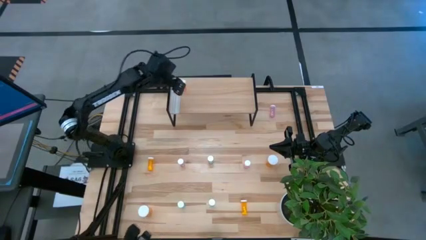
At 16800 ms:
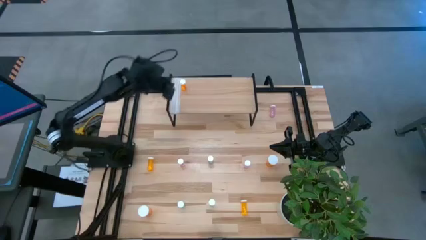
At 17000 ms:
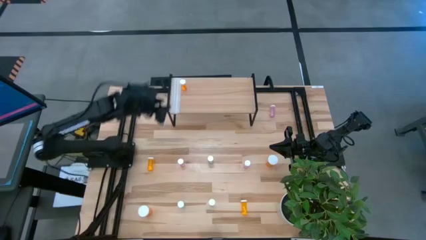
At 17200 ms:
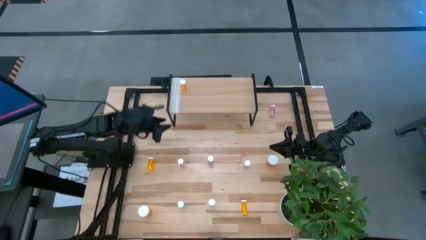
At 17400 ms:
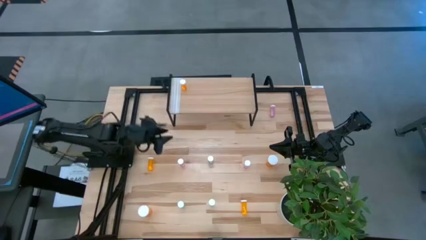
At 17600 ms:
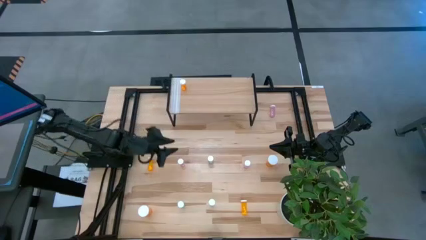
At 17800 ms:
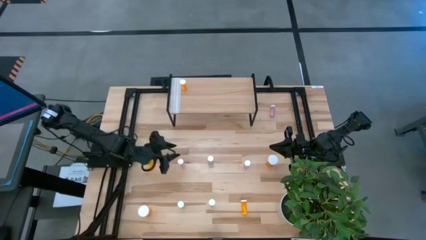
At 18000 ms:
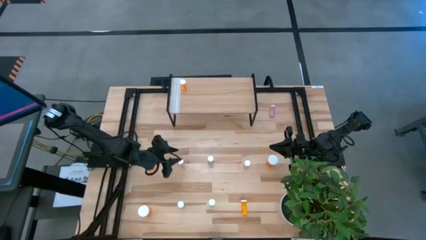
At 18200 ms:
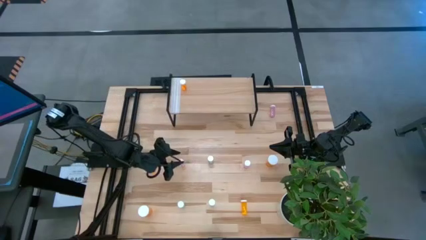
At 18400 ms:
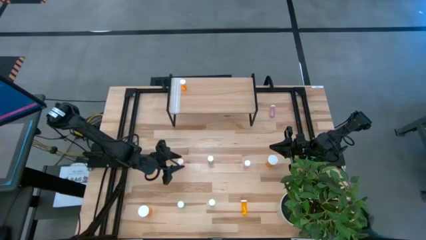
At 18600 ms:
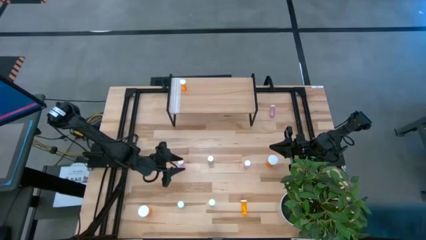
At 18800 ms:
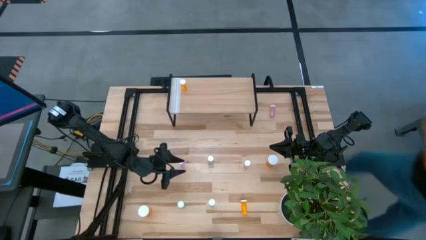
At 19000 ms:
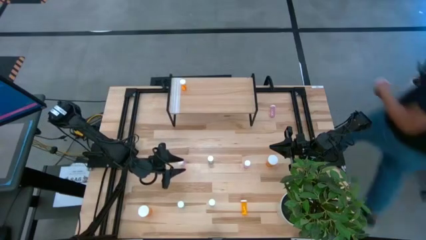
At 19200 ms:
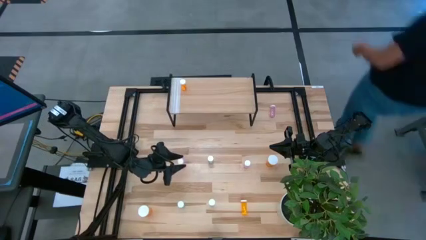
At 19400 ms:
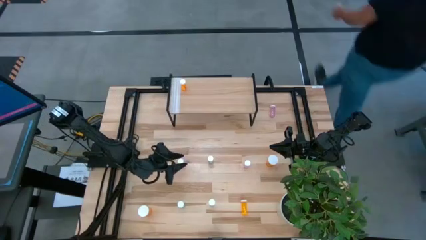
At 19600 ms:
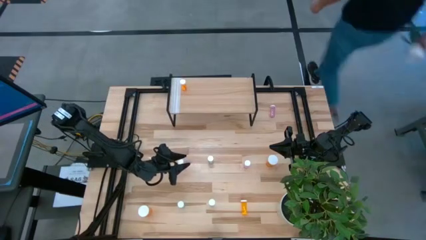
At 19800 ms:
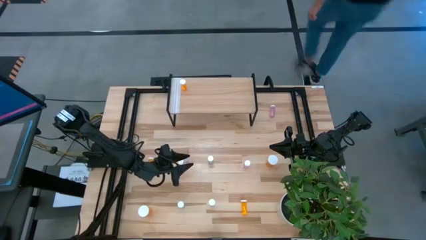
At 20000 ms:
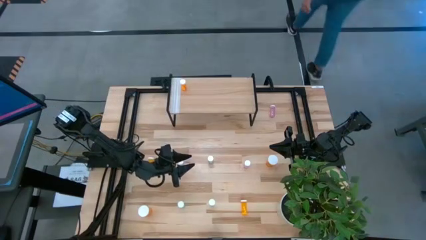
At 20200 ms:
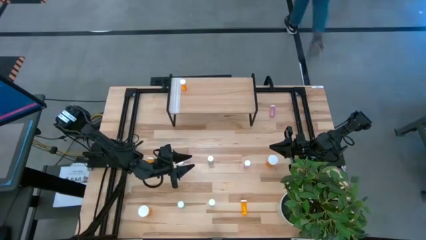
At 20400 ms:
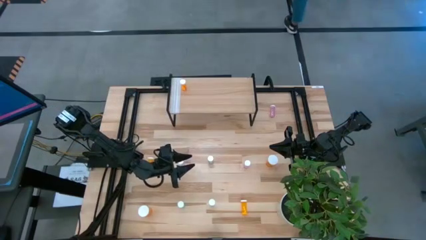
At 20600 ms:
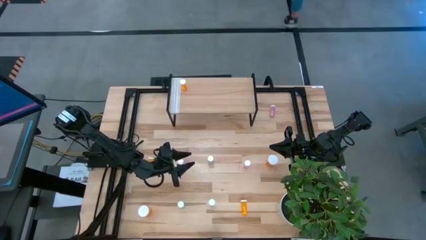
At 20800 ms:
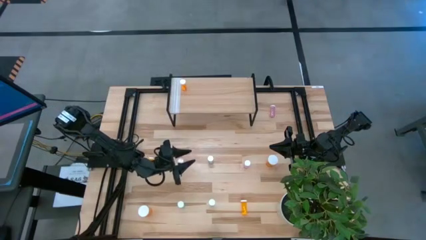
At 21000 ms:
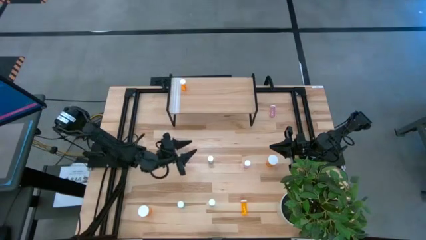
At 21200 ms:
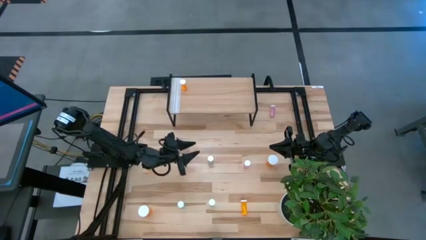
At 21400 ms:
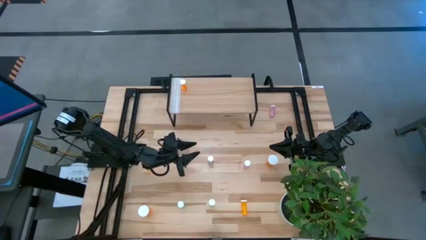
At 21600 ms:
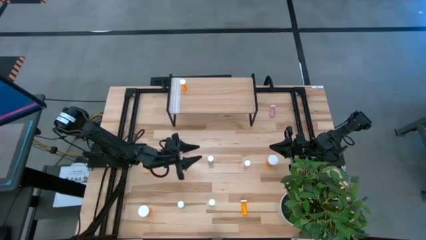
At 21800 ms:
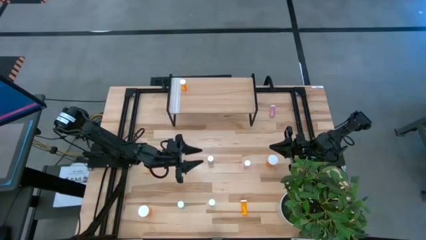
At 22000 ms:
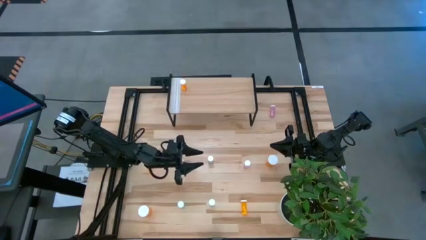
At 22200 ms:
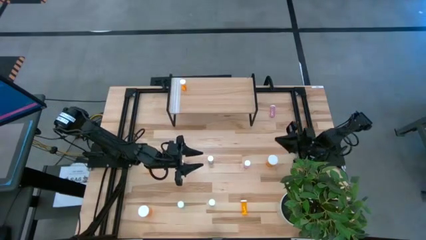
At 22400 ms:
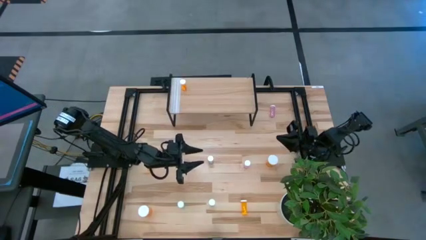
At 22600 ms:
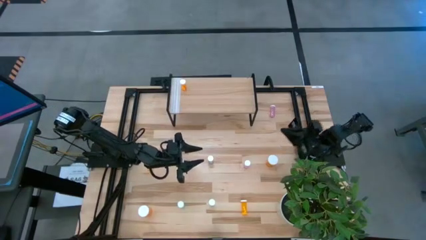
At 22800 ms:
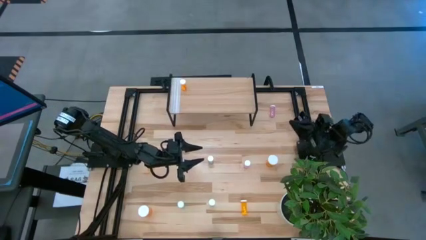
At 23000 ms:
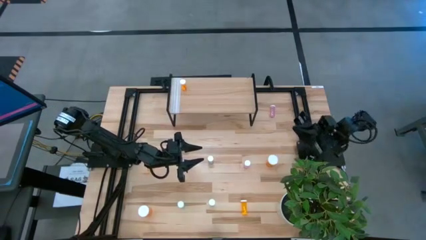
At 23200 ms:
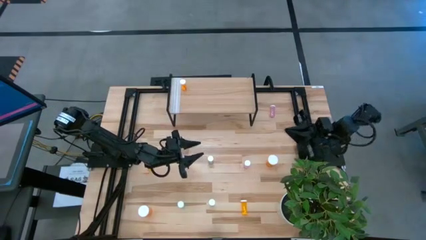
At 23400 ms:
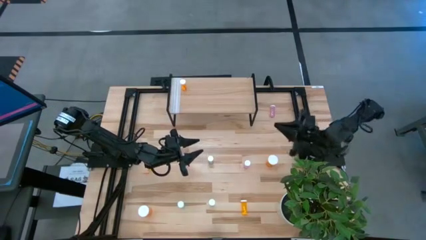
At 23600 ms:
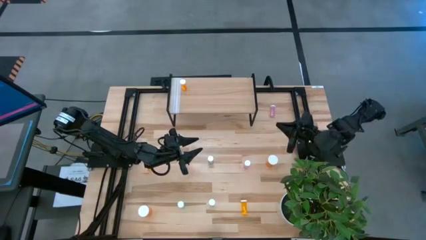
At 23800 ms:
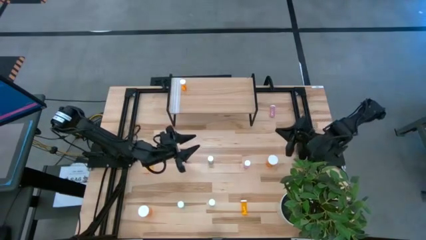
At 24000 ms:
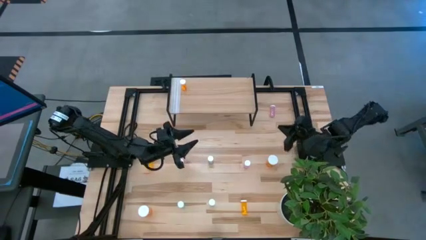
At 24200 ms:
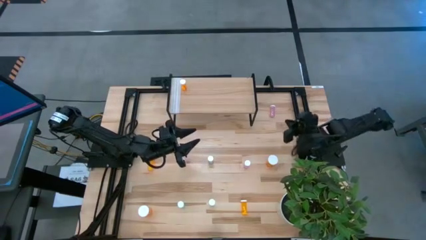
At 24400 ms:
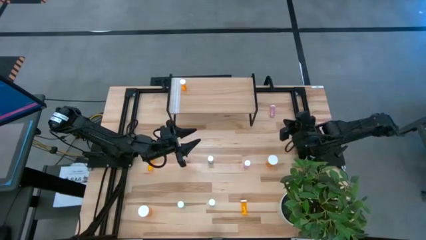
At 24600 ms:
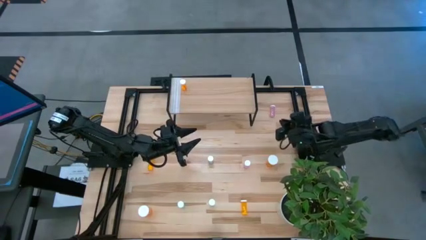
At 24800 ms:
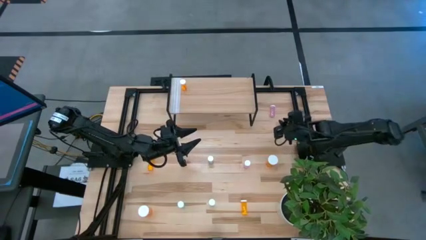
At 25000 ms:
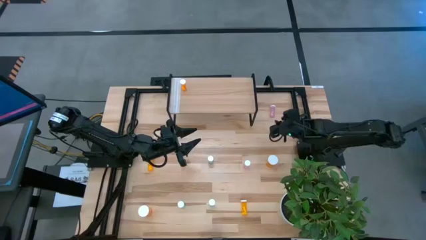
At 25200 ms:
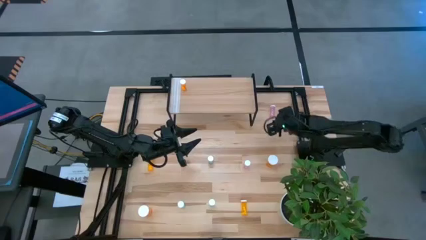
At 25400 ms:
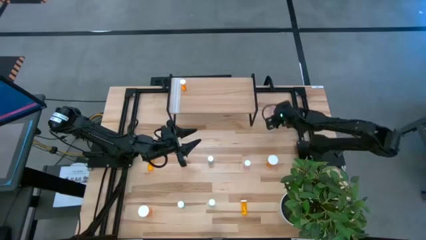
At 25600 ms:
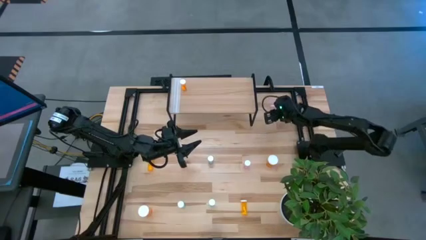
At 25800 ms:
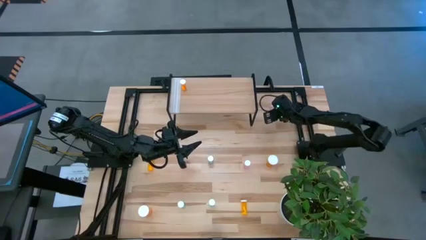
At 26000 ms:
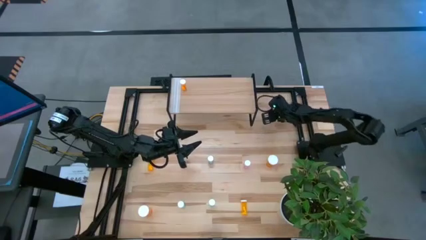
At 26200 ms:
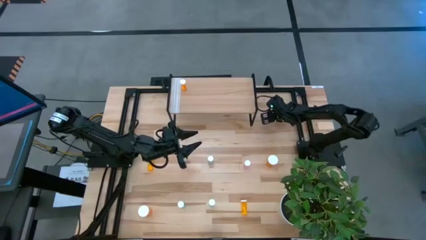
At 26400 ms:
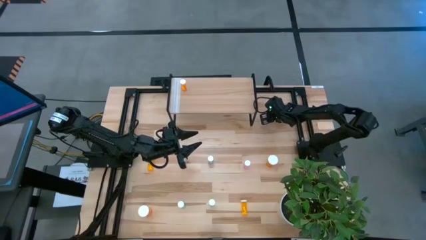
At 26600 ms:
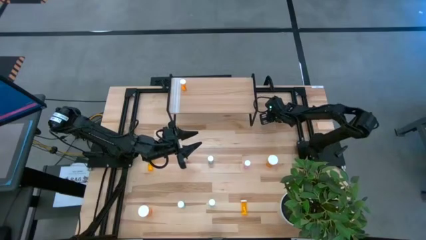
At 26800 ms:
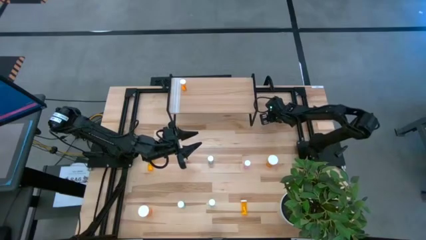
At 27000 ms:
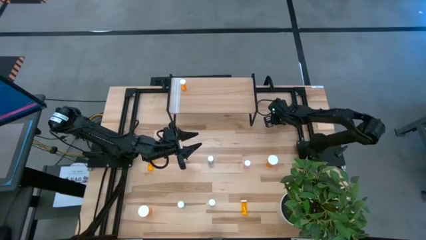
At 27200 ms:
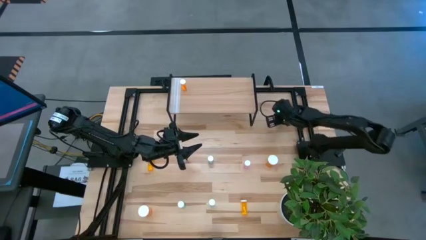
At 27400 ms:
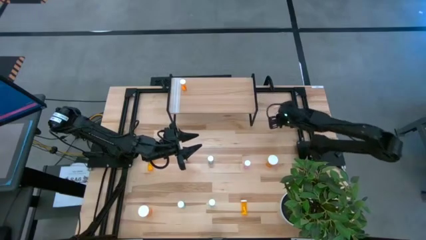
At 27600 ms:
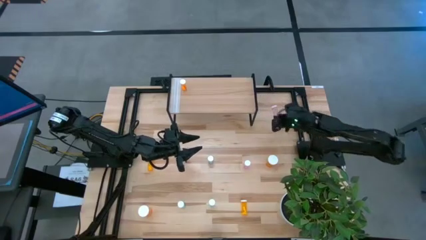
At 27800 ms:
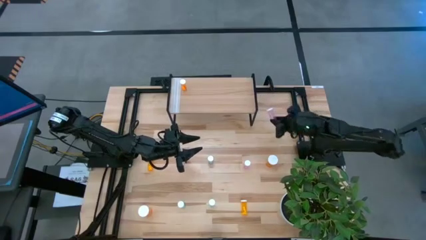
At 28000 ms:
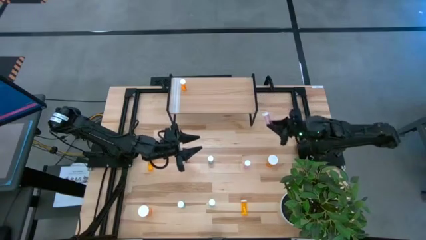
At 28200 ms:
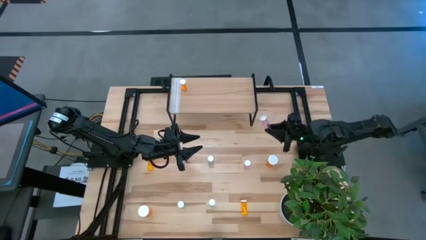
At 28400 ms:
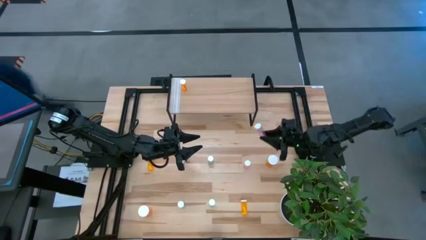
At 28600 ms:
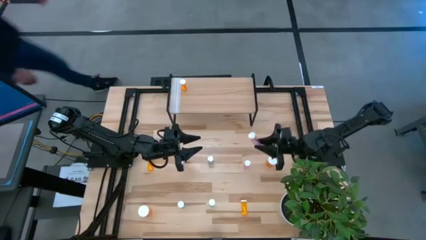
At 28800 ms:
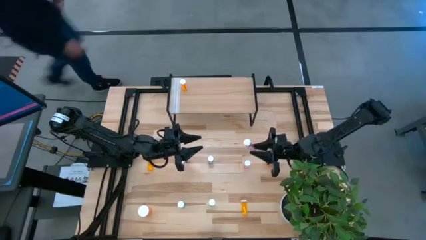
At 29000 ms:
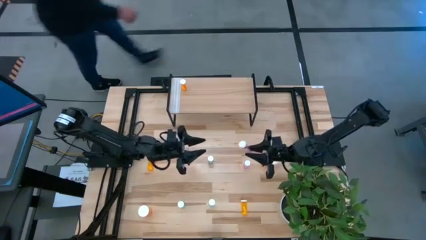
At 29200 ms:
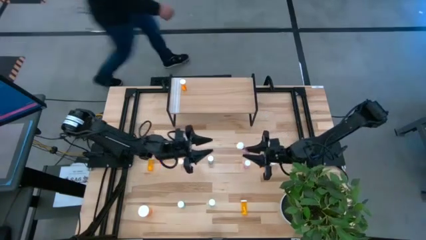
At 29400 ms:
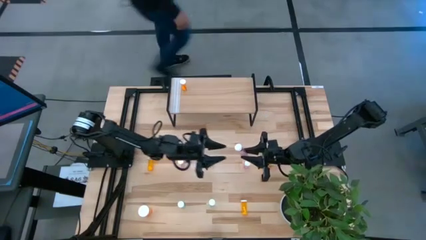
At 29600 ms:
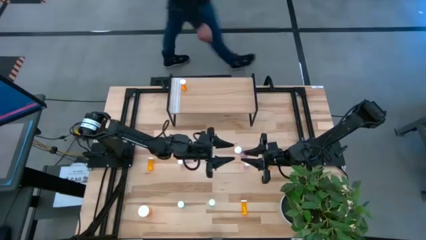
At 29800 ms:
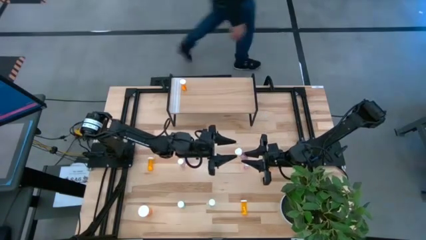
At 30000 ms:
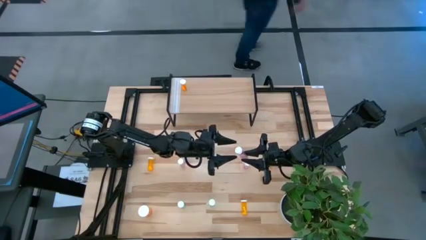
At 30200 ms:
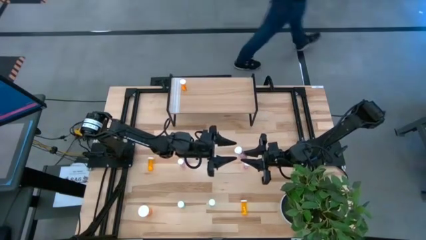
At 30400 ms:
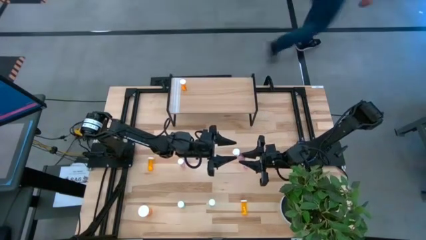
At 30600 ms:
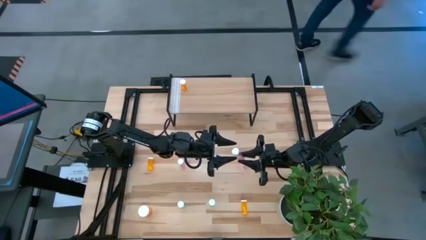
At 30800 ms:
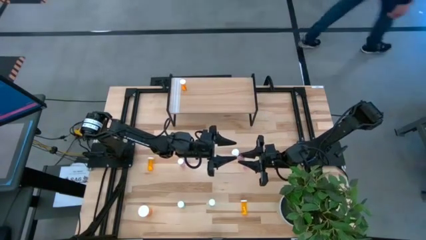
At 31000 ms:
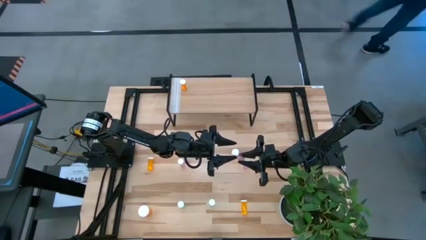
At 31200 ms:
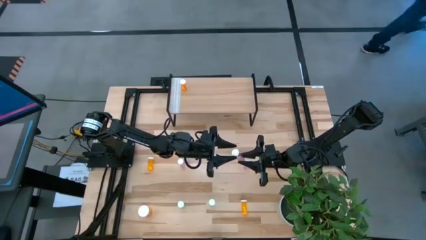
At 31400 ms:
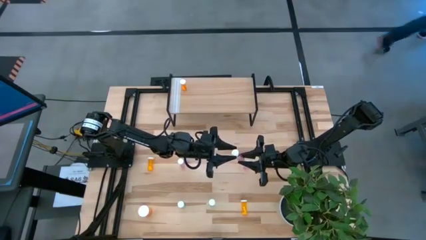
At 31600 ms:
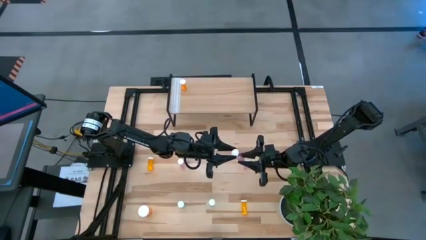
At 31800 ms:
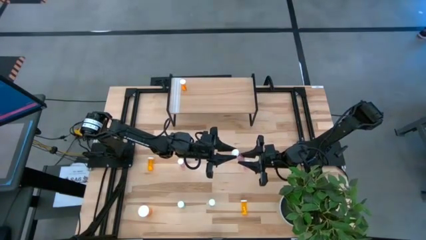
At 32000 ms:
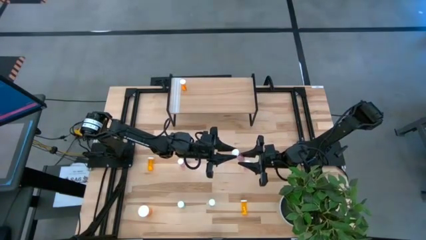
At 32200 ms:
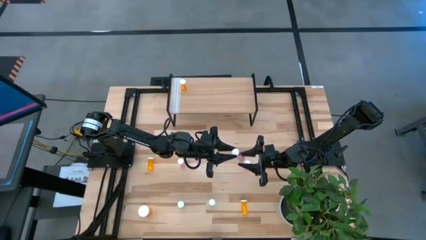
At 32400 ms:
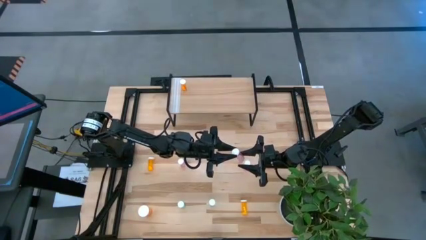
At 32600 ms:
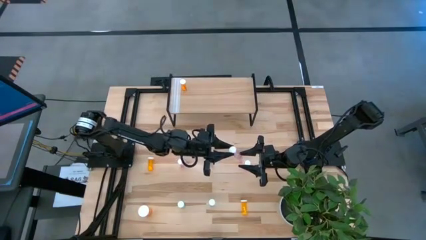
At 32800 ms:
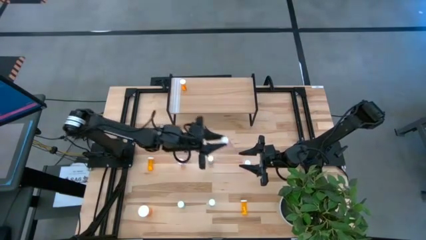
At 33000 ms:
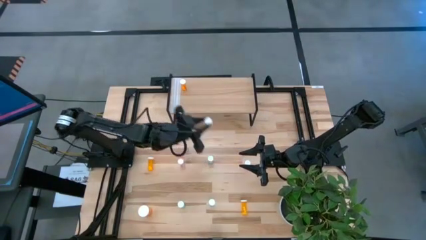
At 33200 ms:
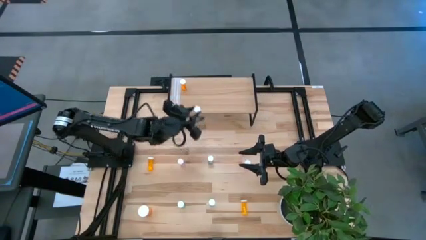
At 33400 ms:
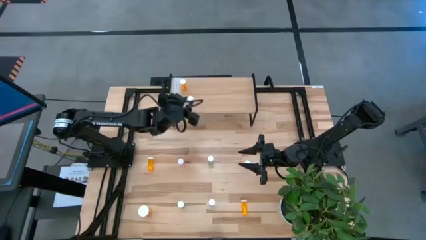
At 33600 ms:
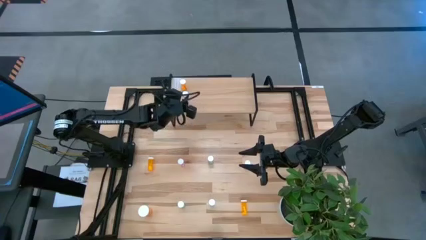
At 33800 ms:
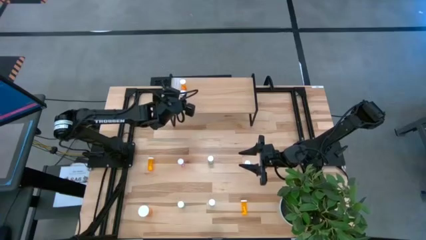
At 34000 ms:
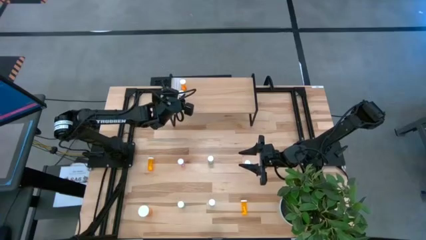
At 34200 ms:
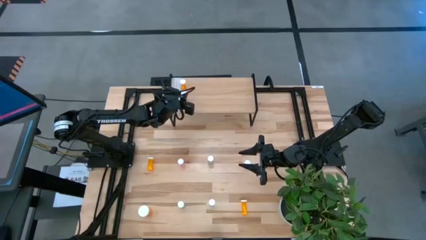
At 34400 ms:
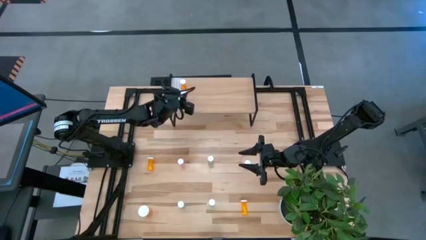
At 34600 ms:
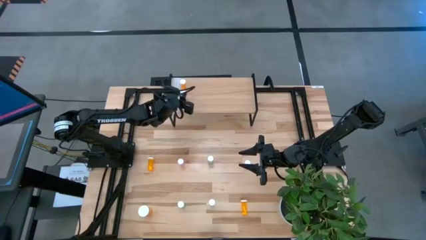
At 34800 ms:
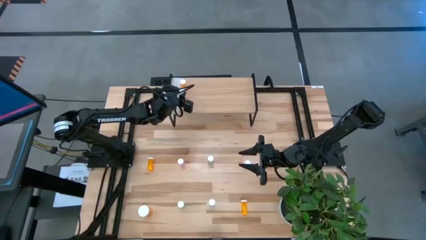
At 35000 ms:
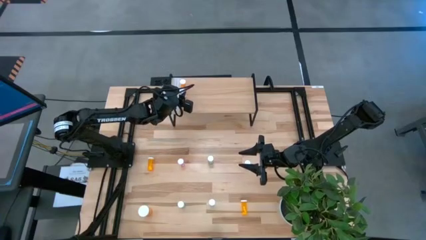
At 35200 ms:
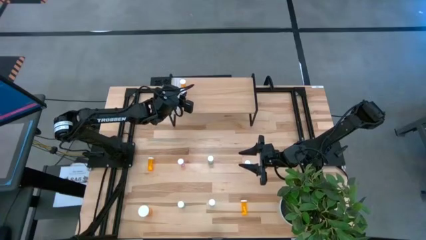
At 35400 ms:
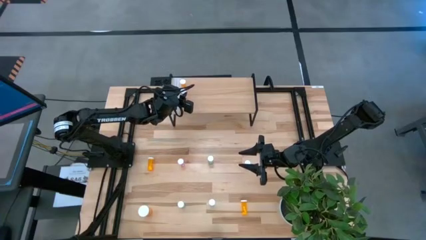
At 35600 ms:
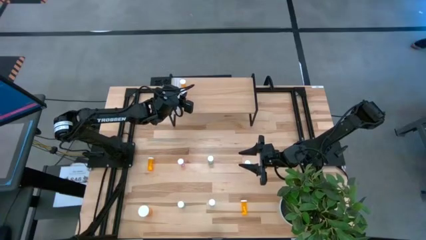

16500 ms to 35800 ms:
Task: Pick and place medicine bottles onto shelf by color
Put the top pink pill bottle on the shelf
